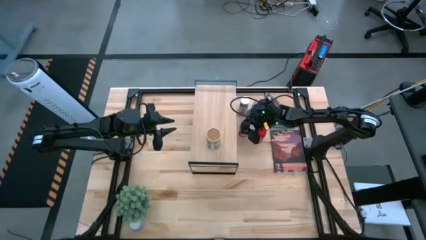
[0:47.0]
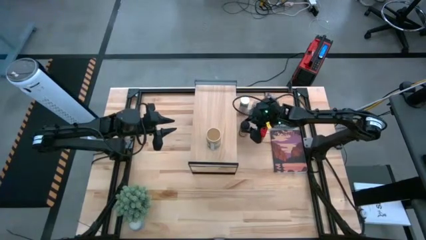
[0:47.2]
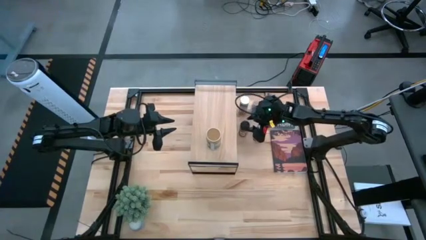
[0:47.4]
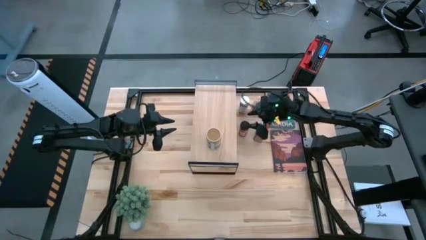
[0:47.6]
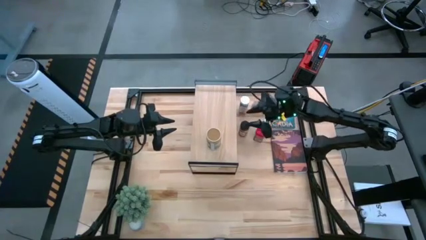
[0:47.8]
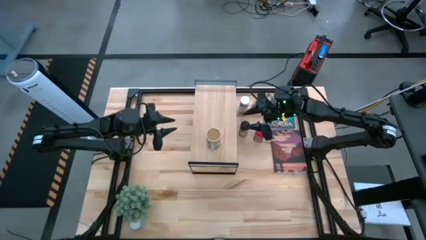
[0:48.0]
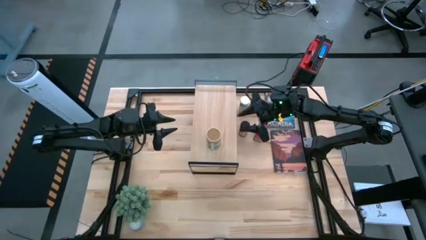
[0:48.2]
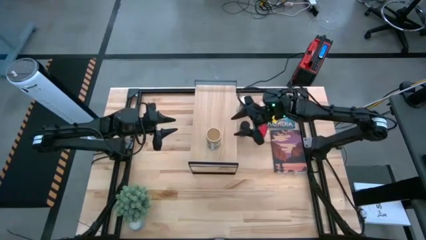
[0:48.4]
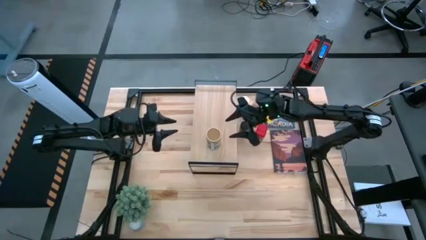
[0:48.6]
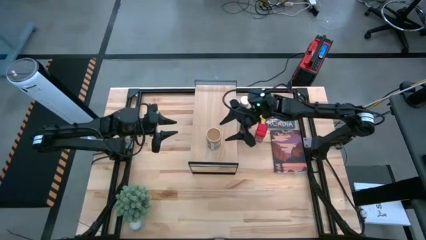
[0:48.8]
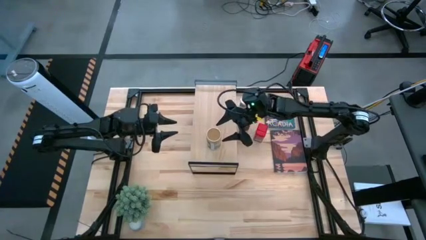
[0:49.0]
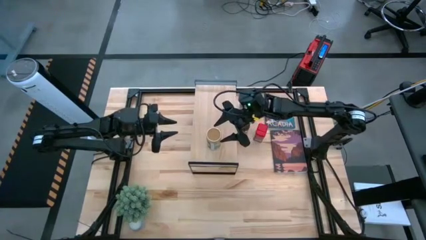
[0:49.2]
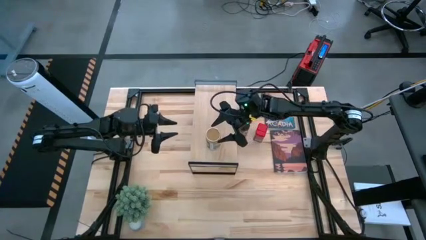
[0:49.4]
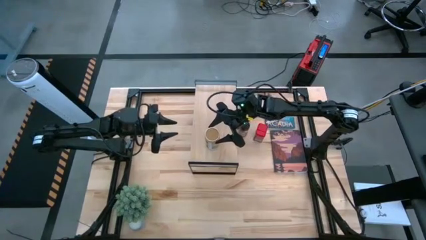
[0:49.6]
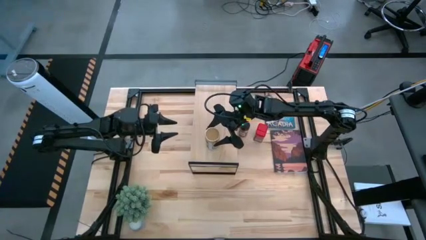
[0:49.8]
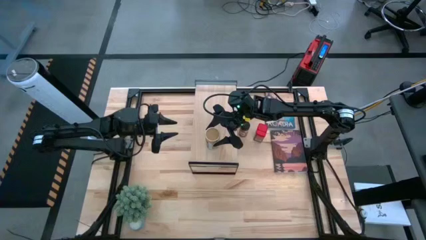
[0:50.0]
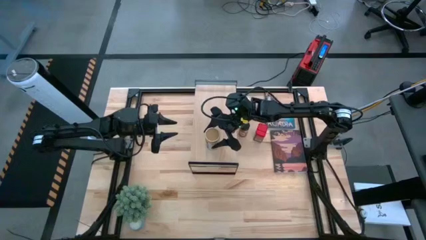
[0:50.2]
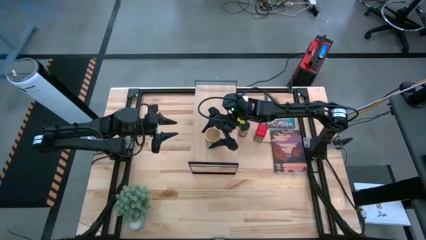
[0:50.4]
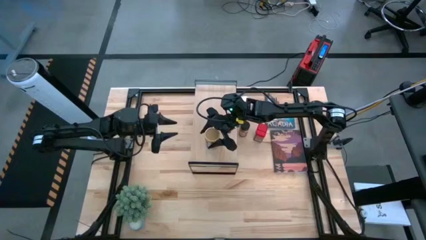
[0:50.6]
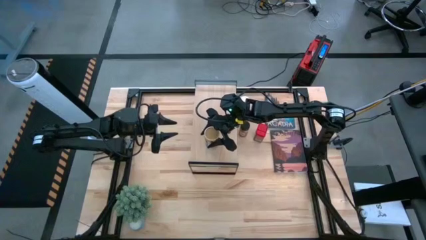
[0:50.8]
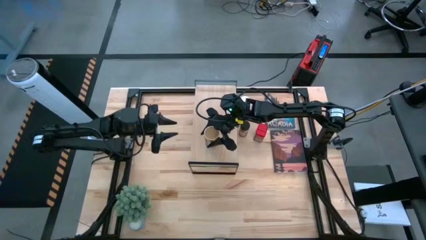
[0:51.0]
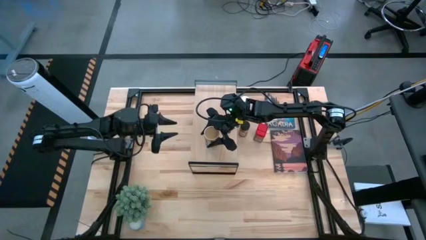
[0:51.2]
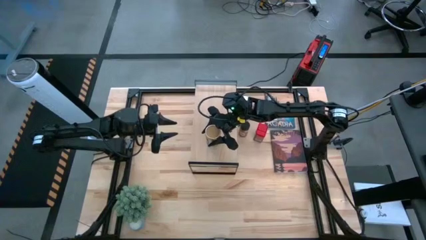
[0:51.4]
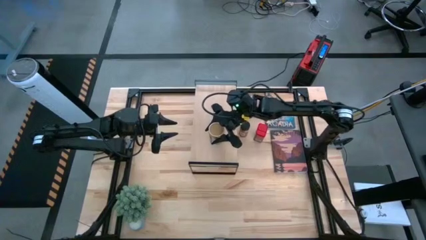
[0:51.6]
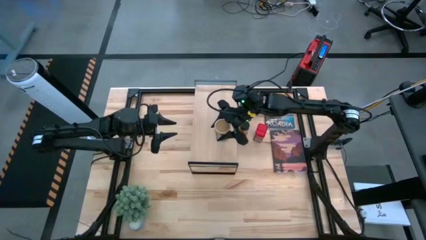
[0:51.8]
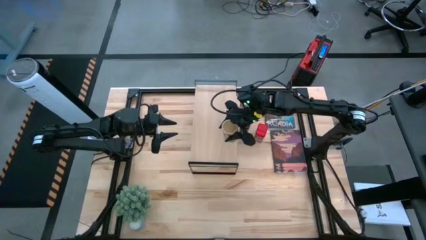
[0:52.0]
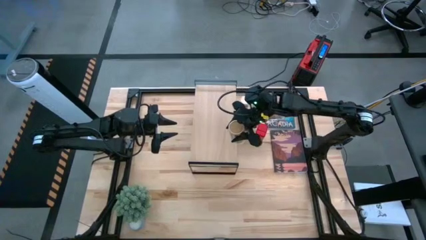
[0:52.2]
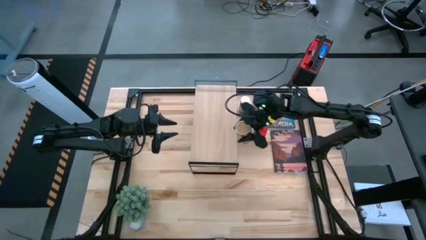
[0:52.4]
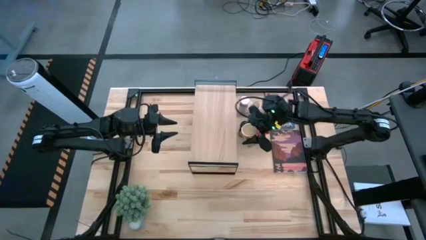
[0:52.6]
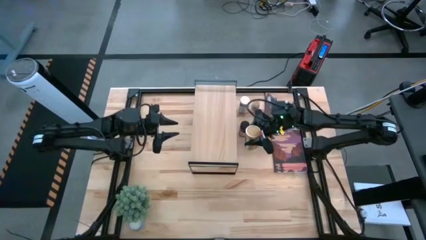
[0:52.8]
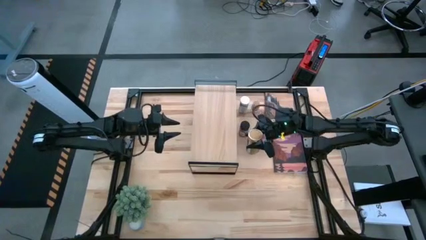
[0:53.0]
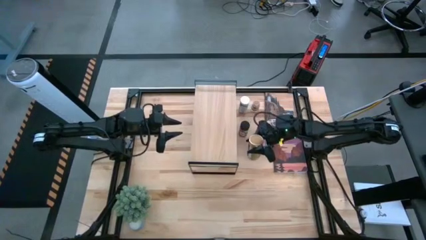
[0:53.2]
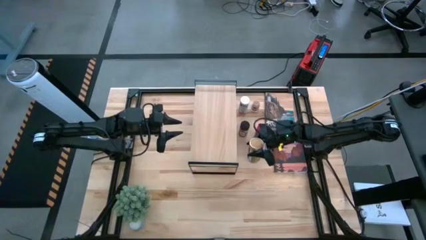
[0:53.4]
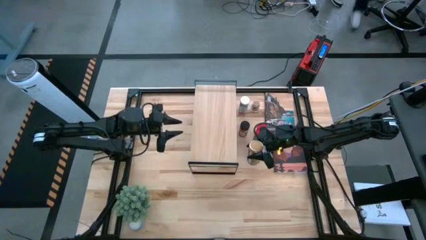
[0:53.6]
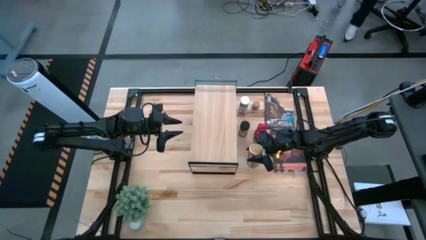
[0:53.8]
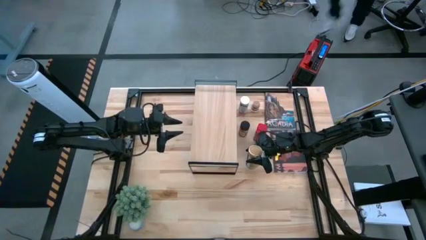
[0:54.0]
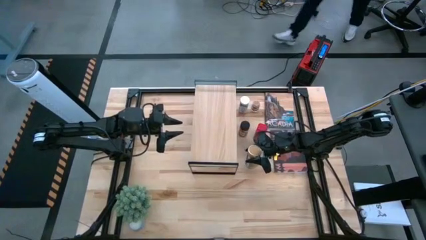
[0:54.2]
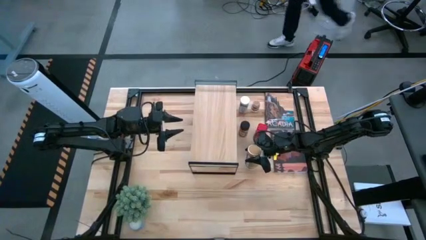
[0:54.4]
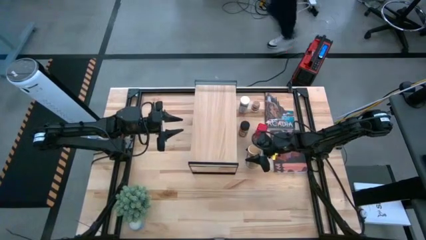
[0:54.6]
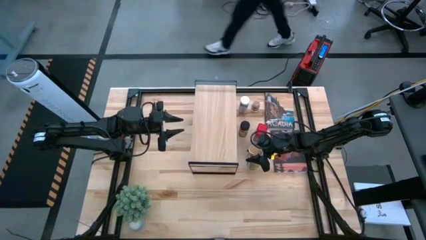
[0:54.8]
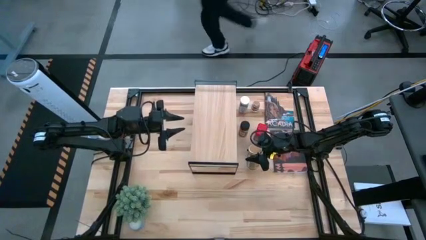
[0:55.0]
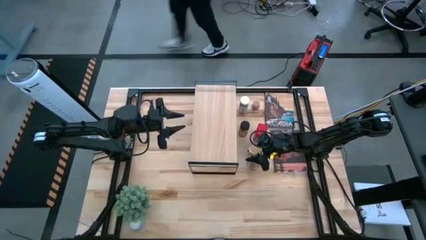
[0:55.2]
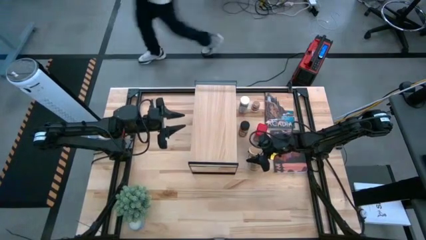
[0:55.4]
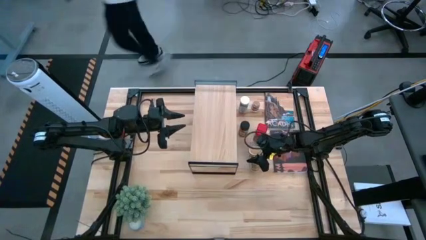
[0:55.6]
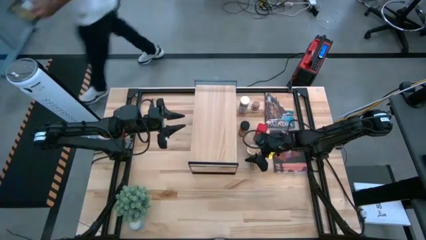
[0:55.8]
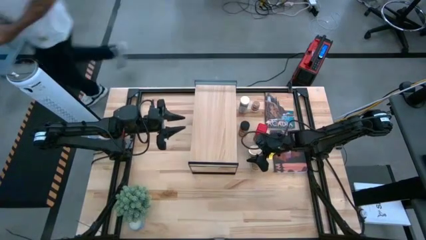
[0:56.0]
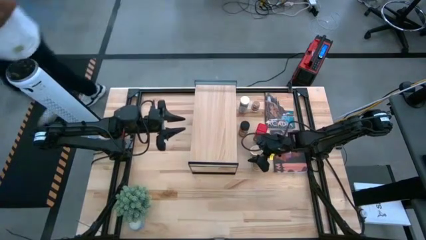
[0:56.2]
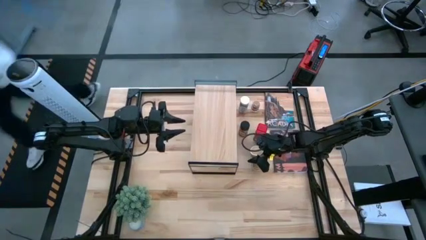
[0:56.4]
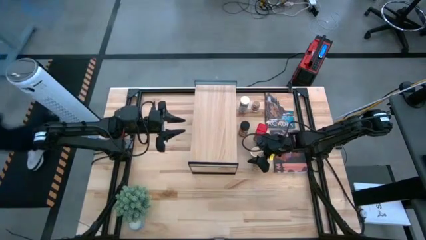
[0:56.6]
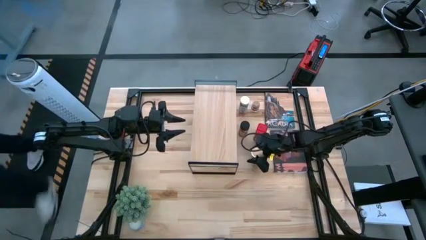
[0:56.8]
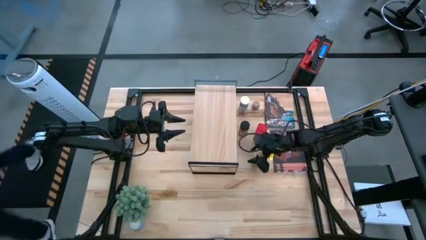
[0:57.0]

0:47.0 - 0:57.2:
Task: Shelf spices
Remove the brown seasoning bottle from the shelf

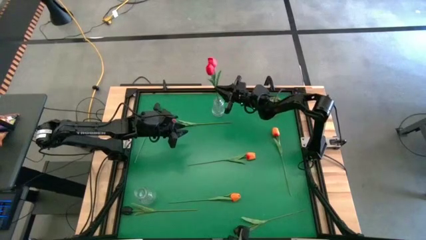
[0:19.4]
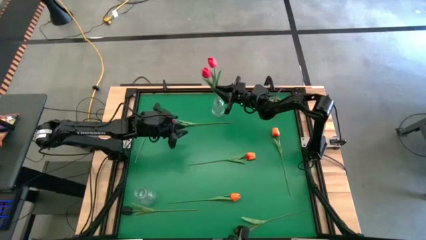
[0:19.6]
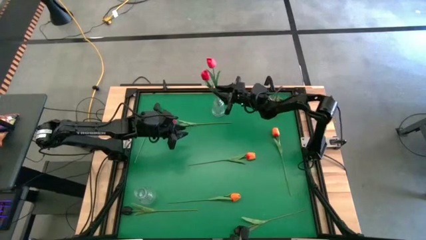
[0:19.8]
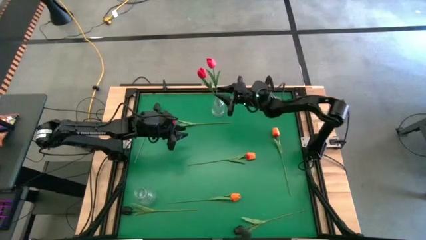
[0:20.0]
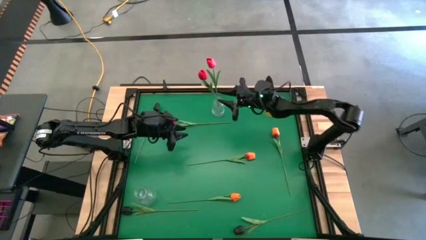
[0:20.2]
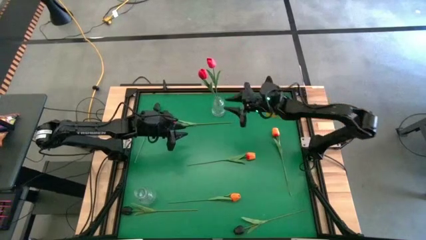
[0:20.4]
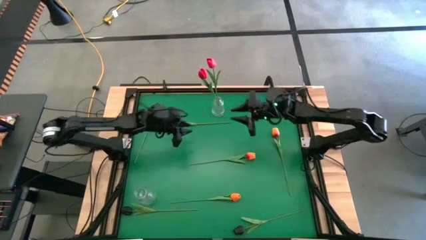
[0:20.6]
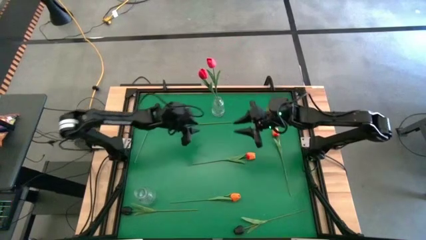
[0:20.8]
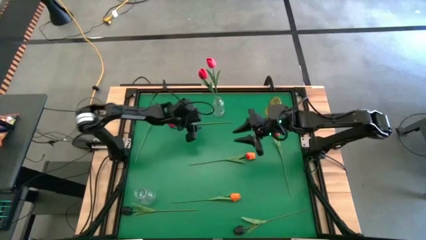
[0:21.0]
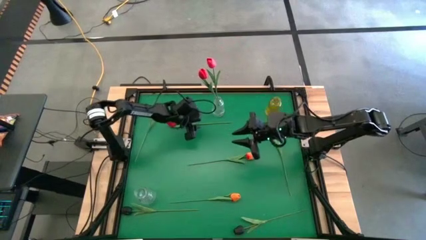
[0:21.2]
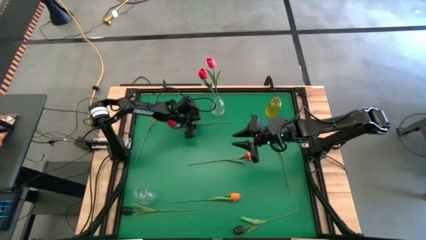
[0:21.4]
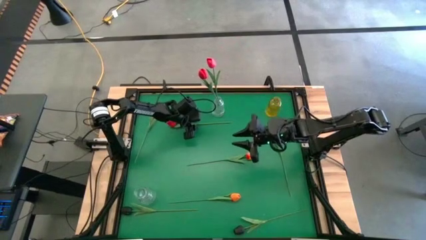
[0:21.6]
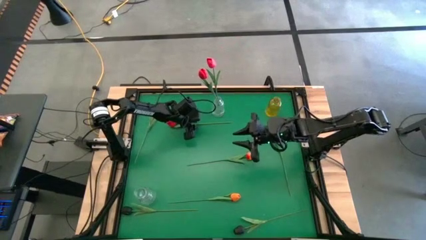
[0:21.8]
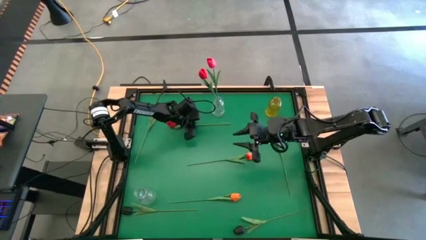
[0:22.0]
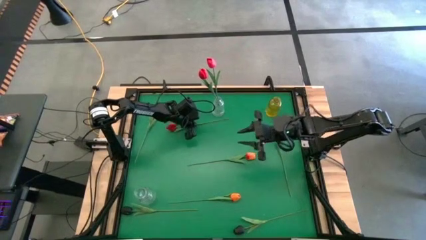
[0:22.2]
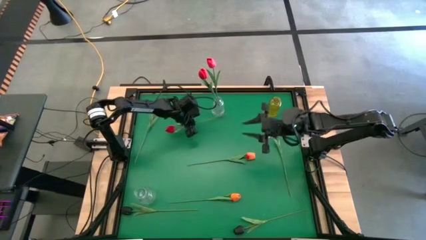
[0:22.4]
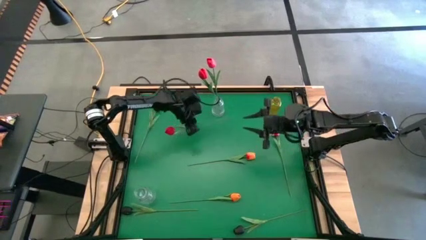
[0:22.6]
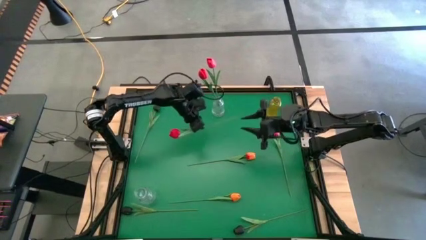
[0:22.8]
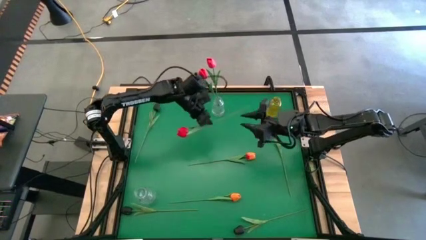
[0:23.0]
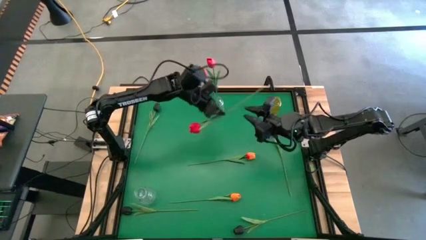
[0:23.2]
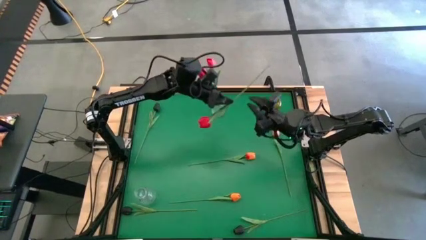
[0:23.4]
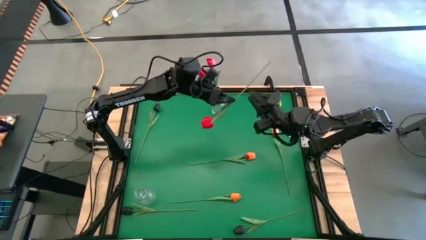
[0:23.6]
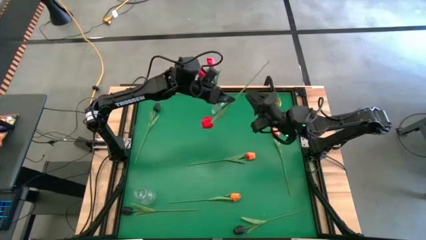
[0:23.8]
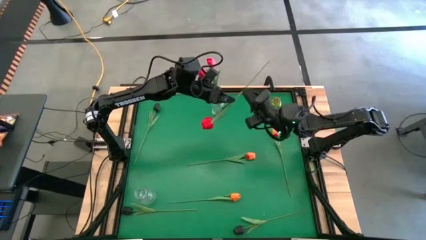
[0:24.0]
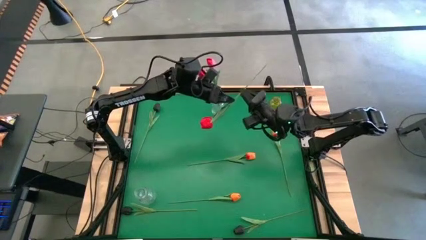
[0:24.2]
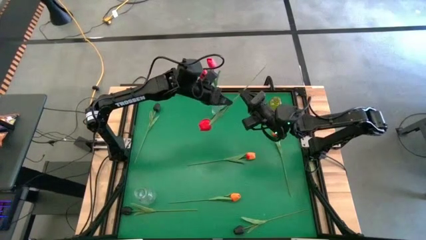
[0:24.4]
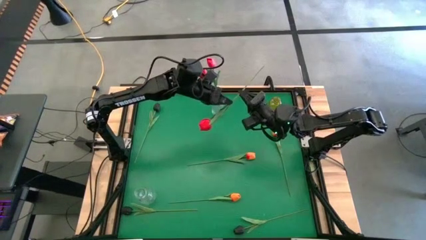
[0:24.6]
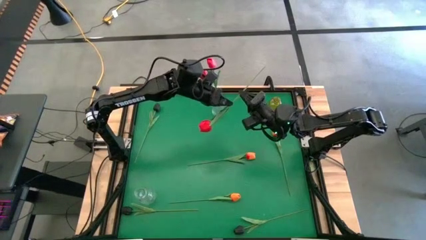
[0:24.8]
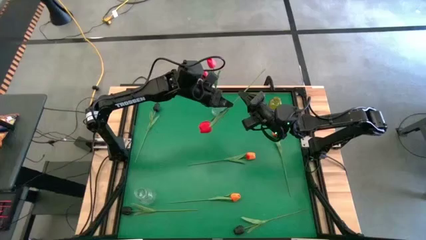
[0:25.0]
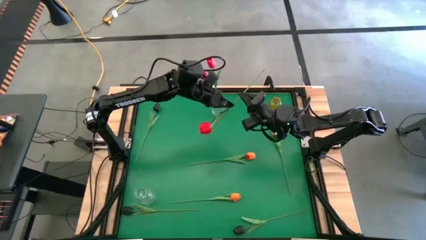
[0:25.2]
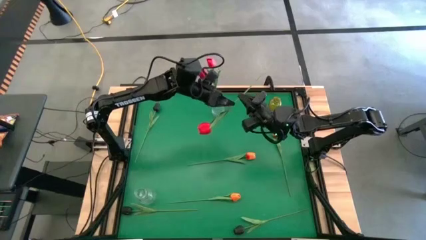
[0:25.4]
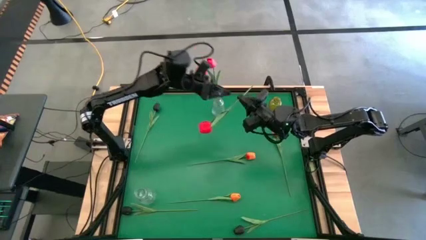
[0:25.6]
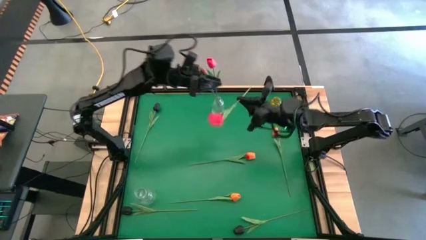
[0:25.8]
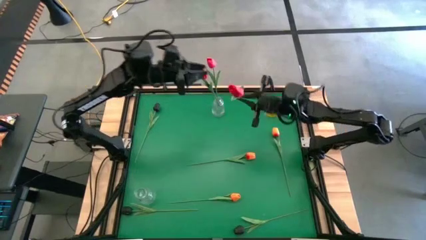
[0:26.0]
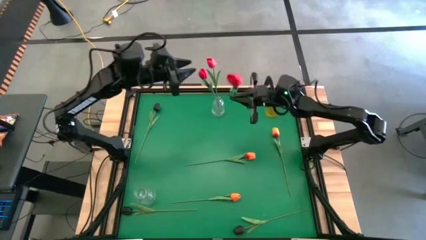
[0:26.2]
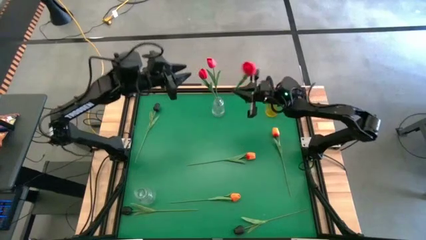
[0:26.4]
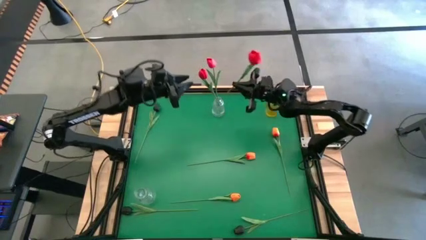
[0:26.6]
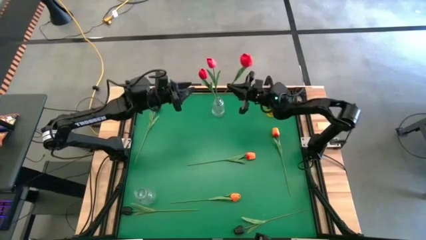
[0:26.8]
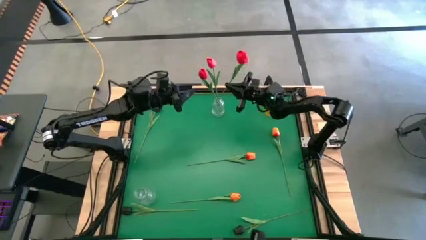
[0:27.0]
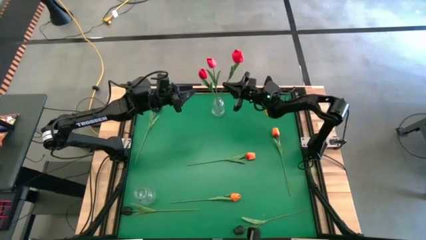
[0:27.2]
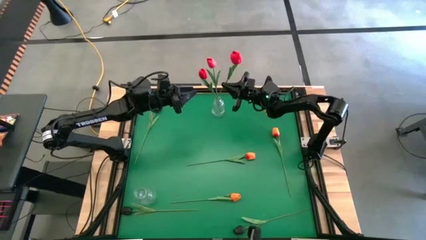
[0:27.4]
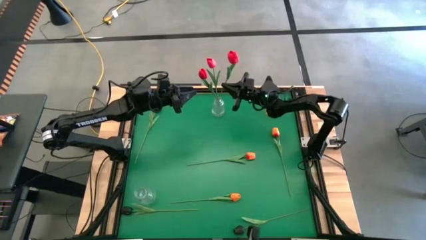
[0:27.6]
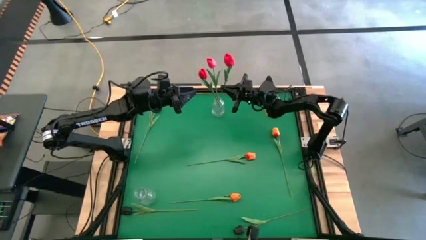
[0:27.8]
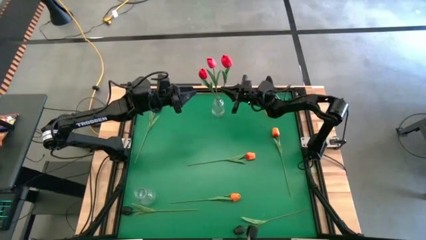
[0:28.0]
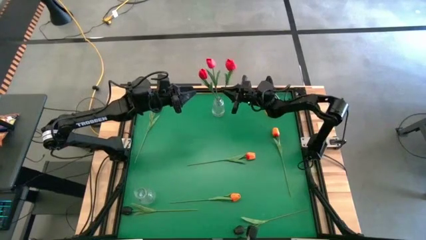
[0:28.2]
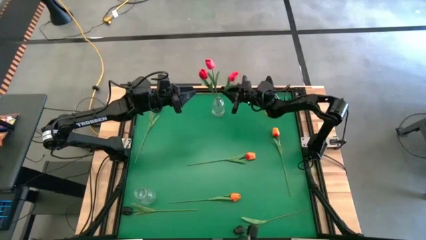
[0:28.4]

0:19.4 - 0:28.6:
Task: Sort flowers into vase by color
Put the red flower into the top transparent vase
